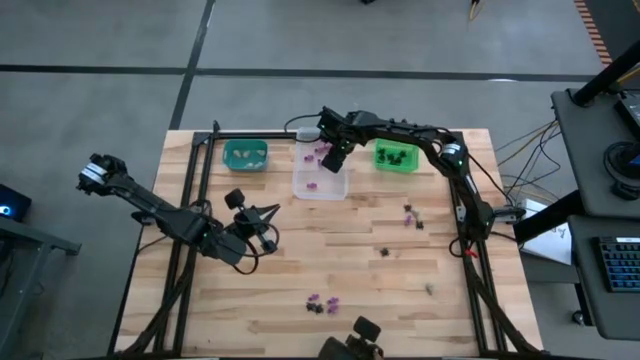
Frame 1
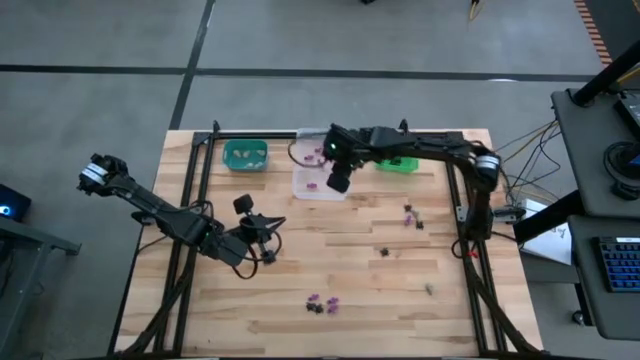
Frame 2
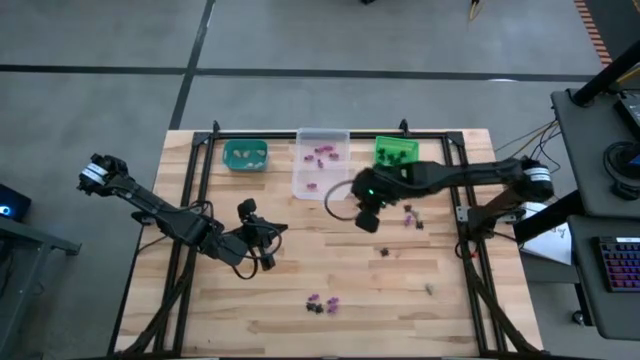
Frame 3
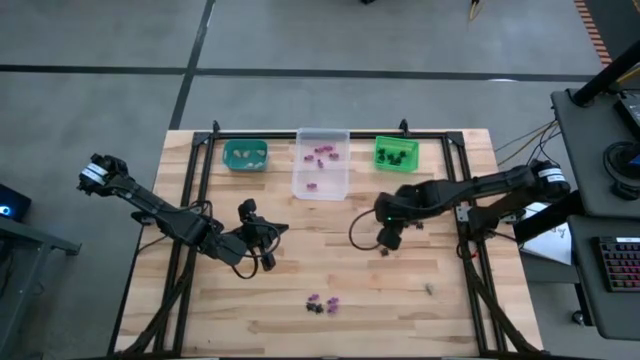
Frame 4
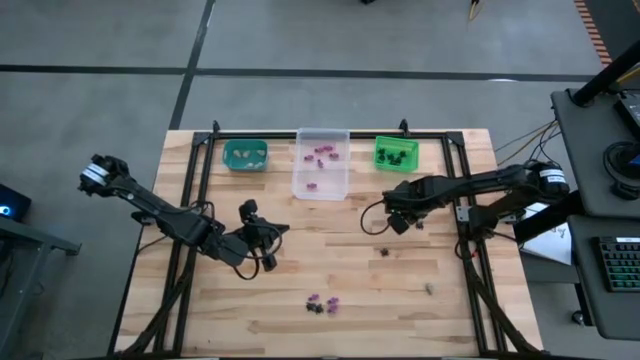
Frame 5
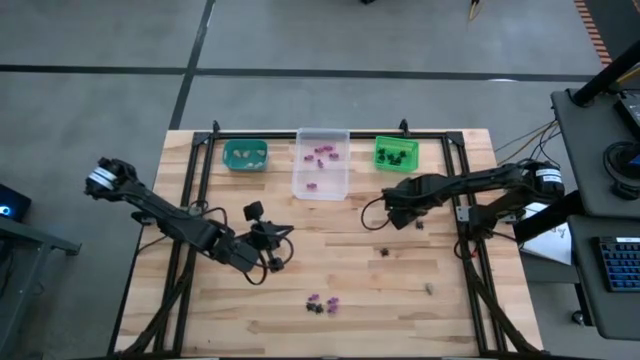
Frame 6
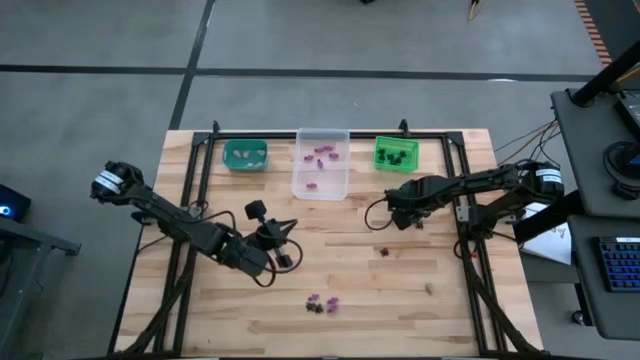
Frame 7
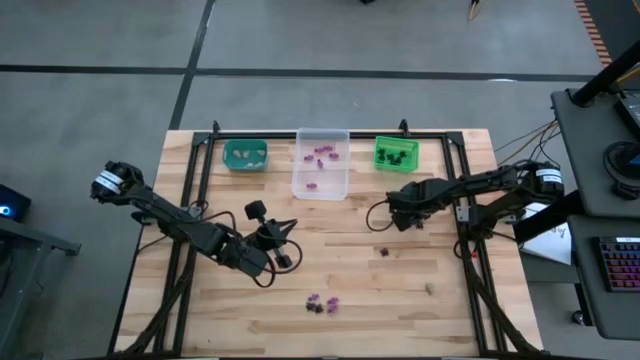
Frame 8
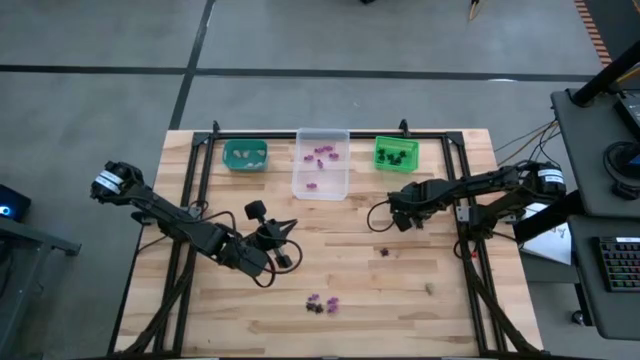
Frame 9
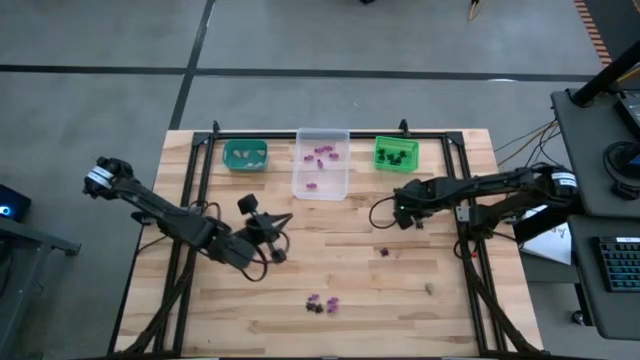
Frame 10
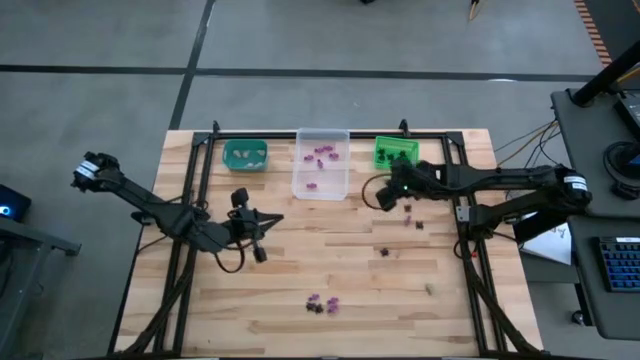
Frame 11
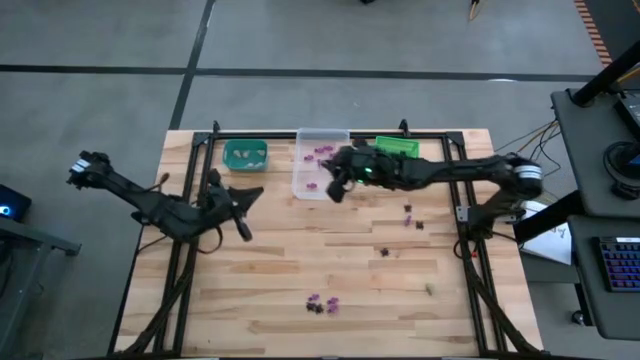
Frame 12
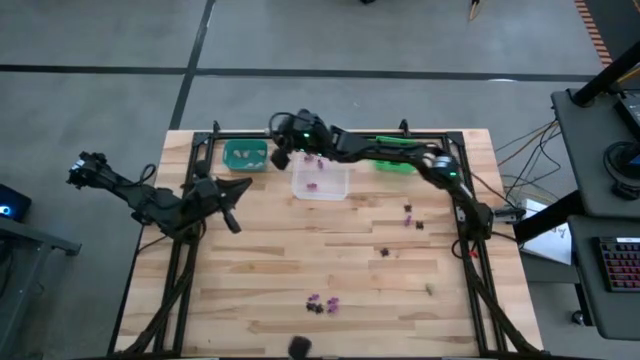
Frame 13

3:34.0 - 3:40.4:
Task: Sort Halloween decoration
Put the white skull toy into the light blue bin

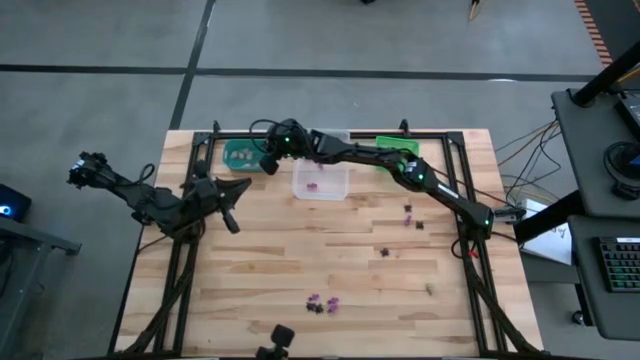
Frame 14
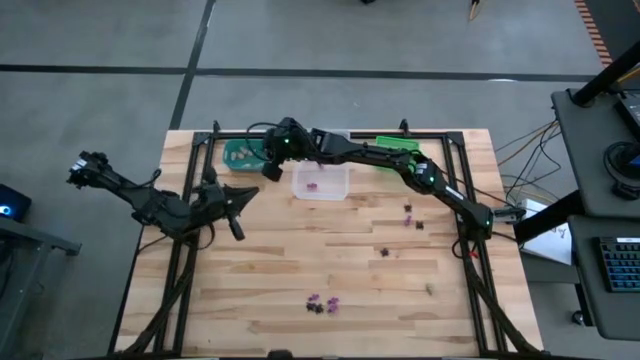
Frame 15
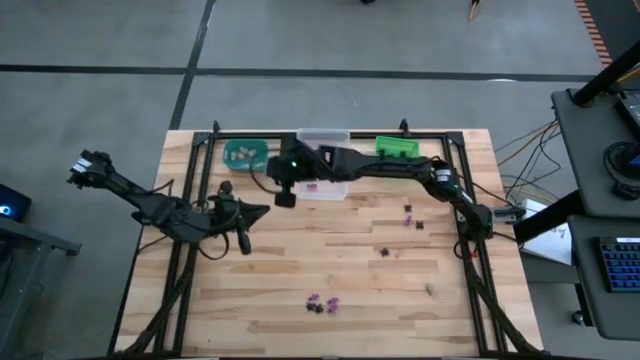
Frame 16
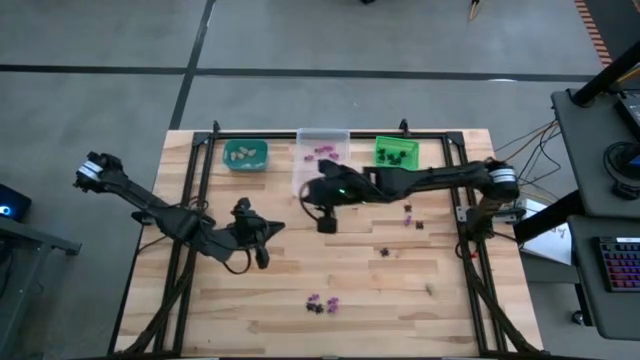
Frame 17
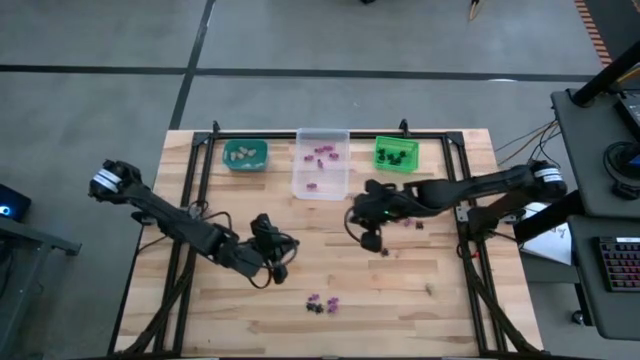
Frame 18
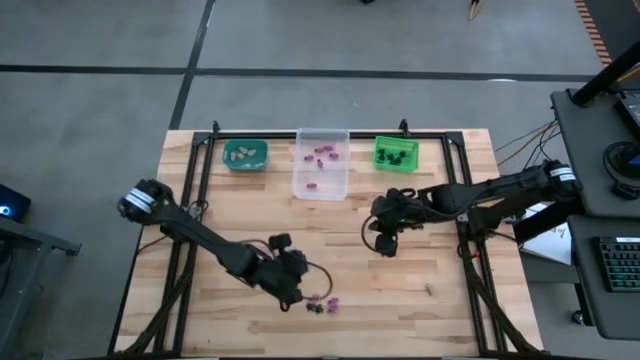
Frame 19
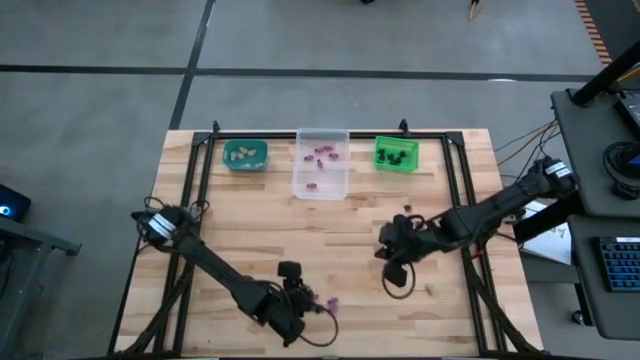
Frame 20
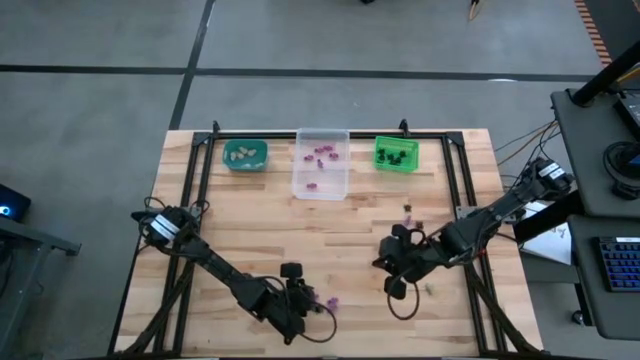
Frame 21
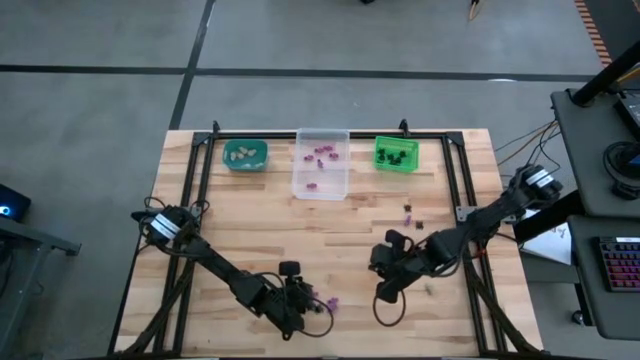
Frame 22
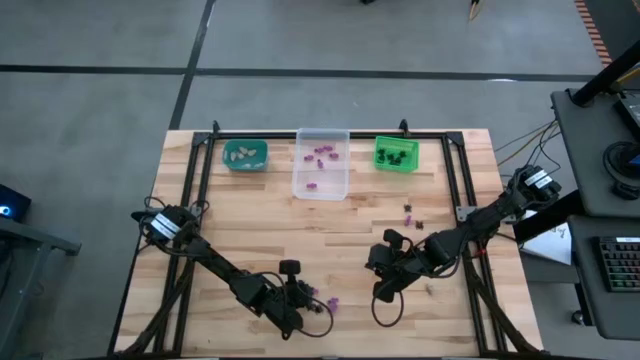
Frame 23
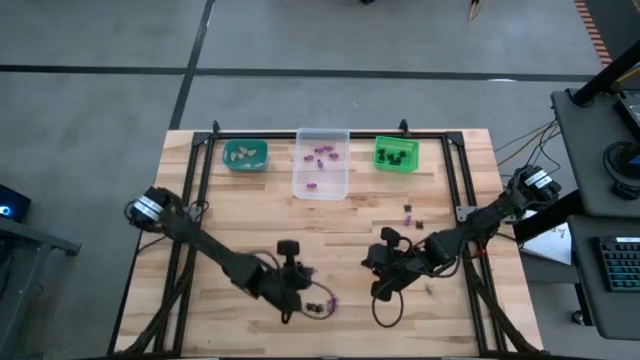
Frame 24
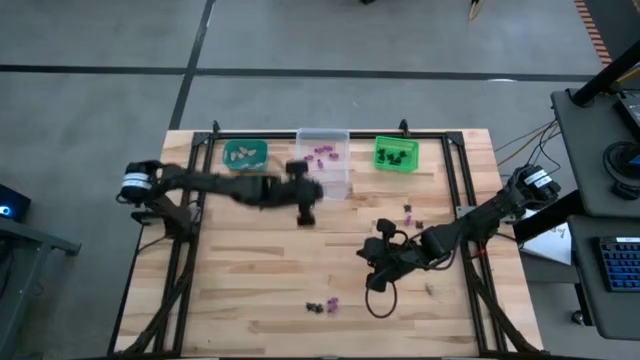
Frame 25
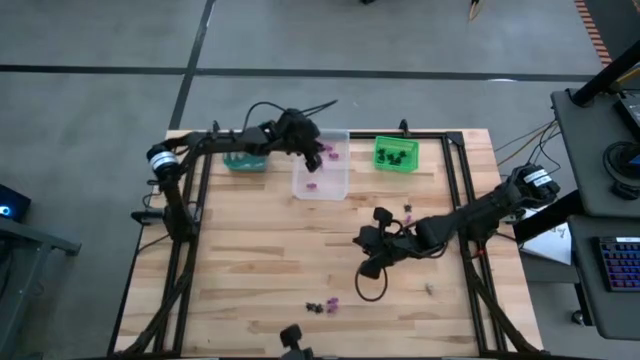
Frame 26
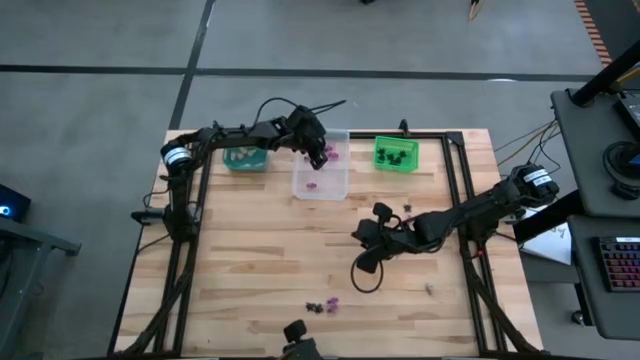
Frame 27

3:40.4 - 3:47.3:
Put the violet skeleton toy into the transparent bin

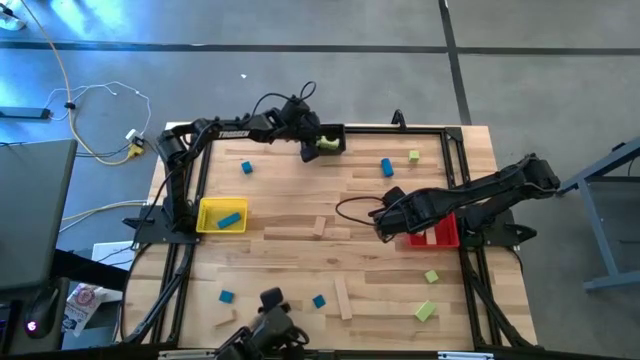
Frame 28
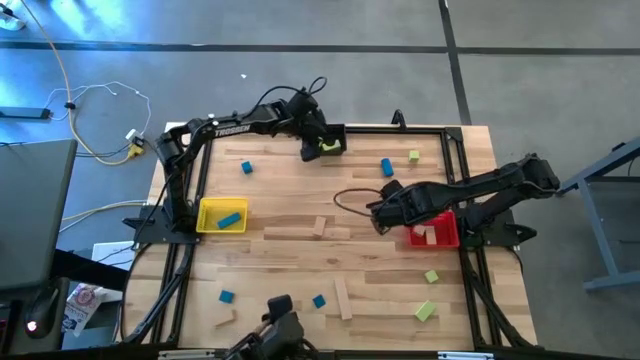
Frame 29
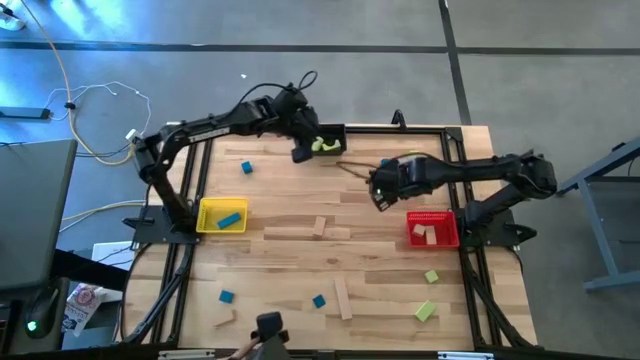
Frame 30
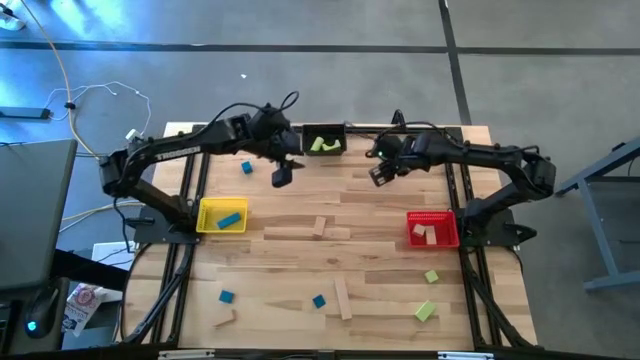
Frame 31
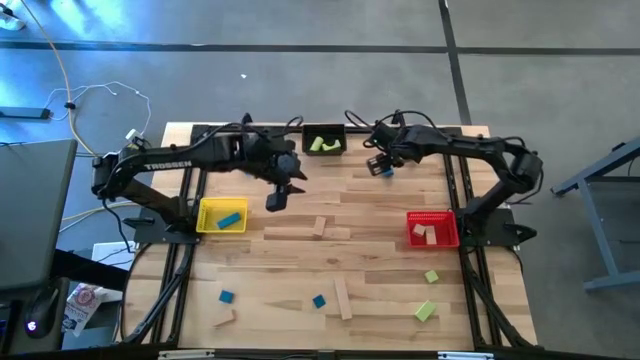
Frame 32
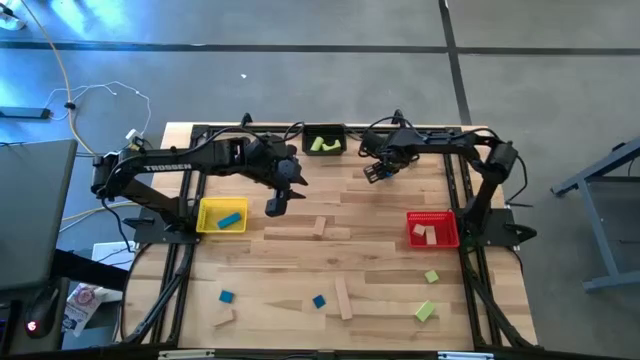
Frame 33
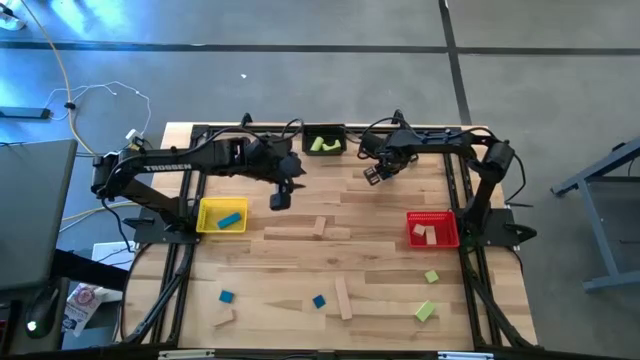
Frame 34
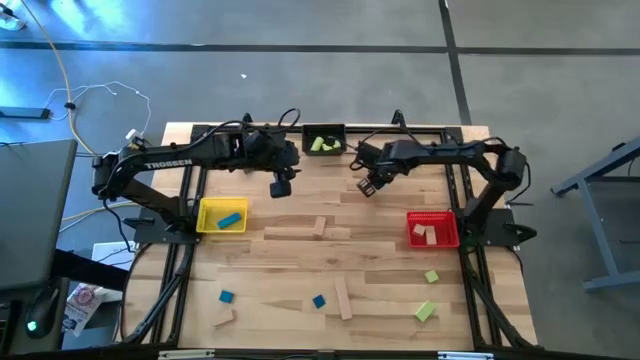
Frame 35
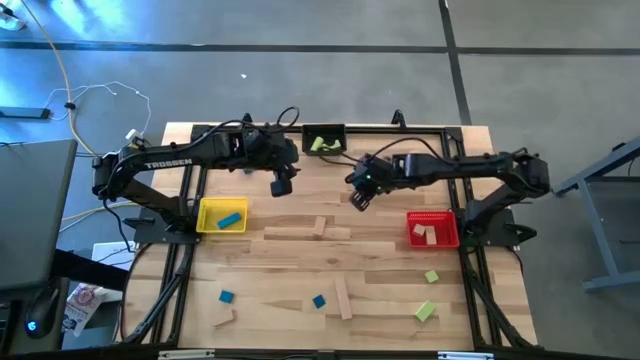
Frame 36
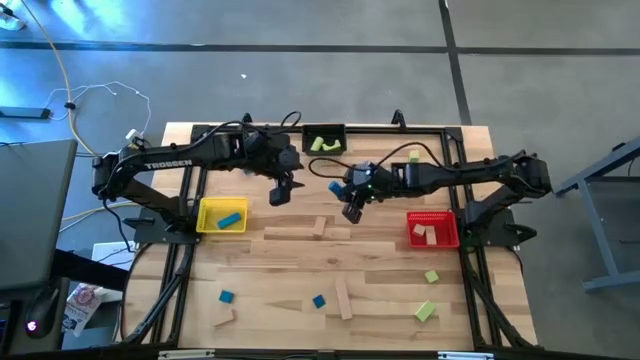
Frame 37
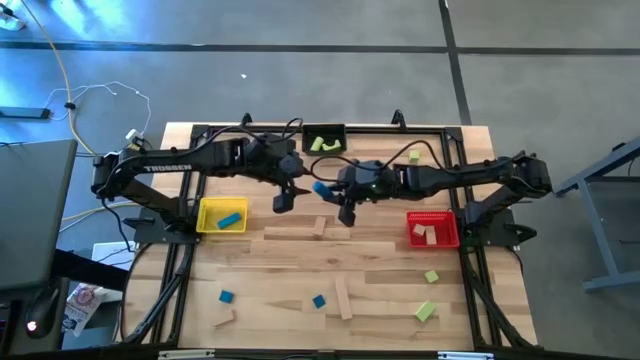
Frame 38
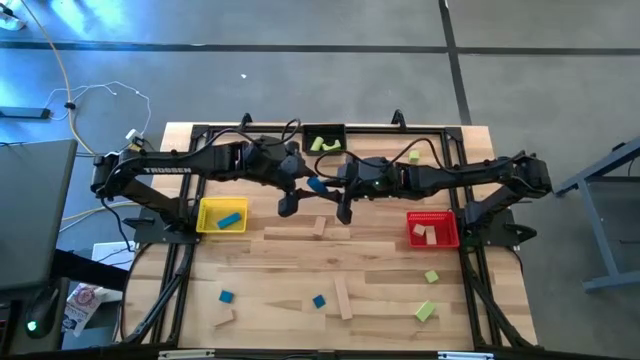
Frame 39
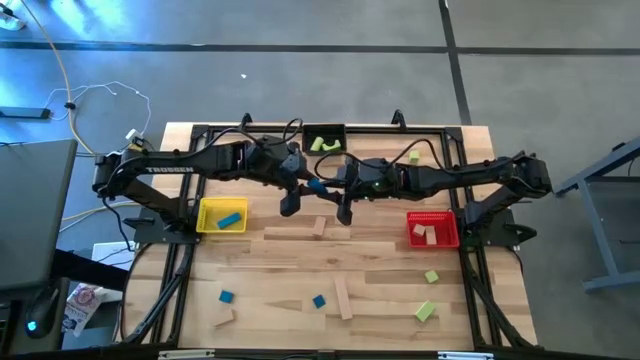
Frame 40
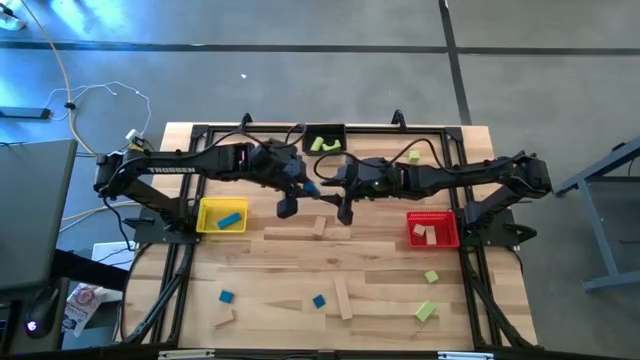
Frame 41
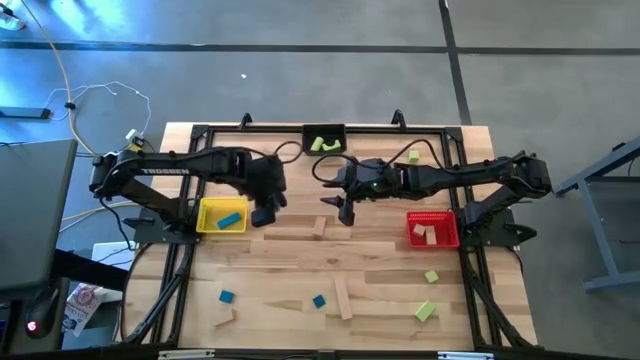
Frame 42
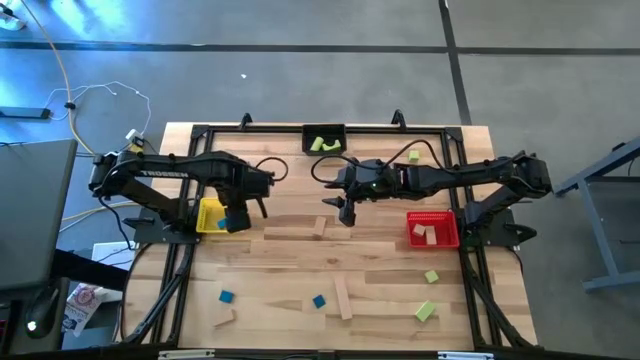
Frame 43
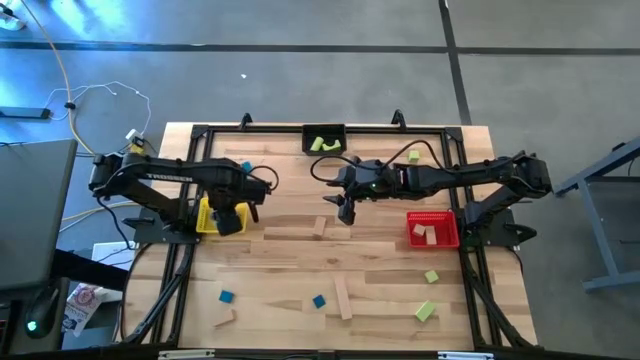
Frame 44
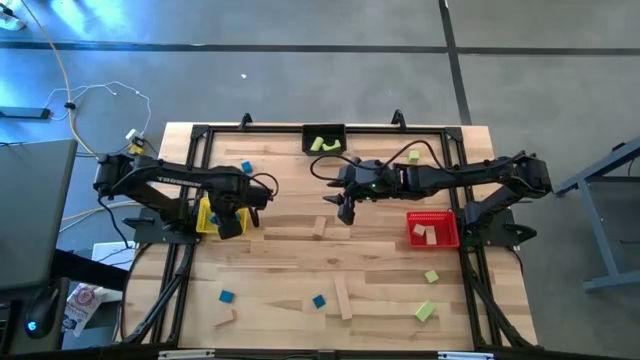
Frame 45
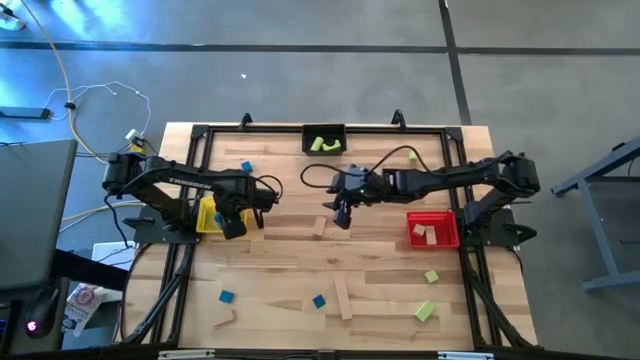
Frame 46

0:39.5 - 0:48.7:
Task: Sort & place blocks by color
Put the blue block into the yellow bin
